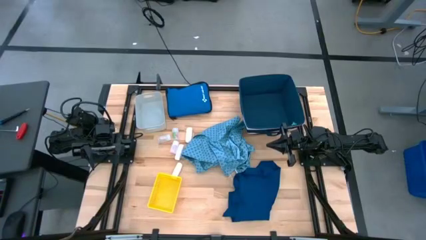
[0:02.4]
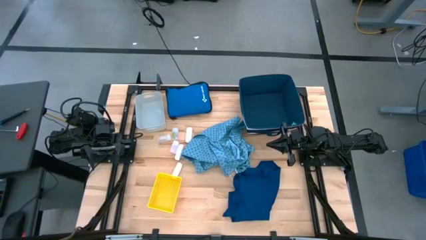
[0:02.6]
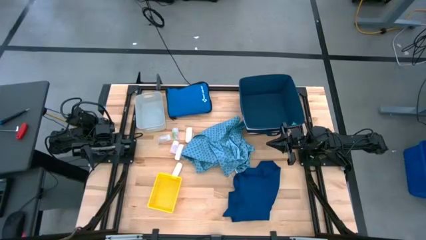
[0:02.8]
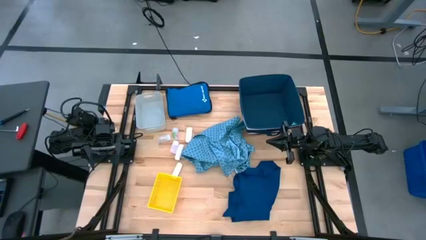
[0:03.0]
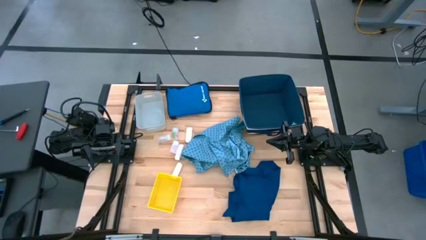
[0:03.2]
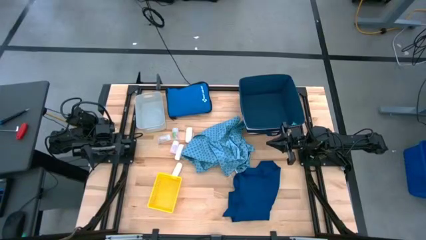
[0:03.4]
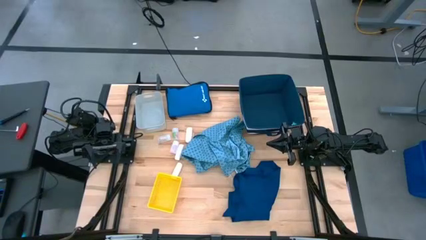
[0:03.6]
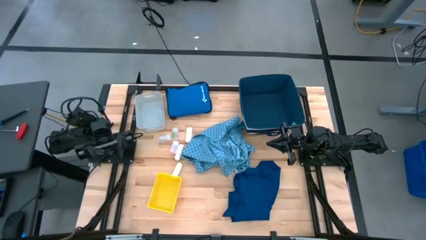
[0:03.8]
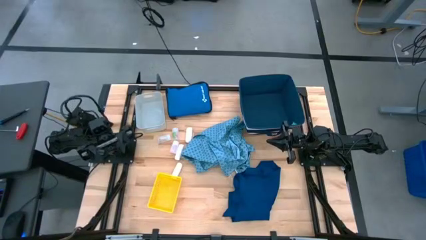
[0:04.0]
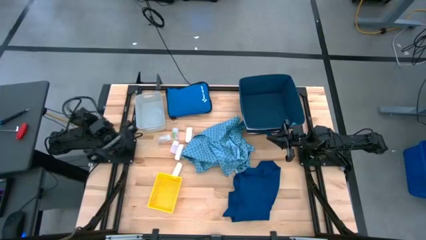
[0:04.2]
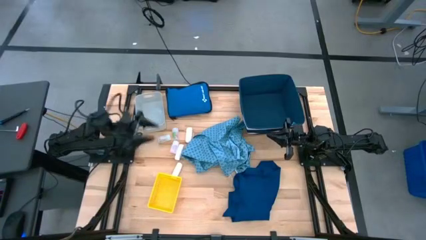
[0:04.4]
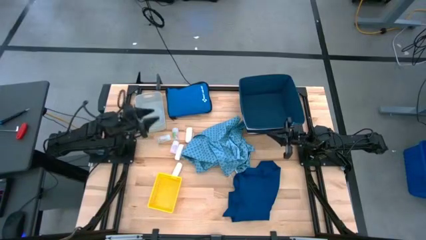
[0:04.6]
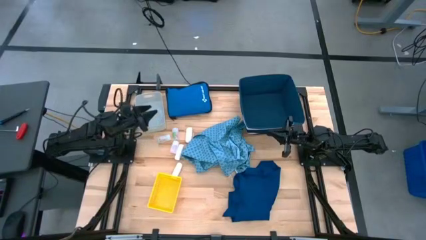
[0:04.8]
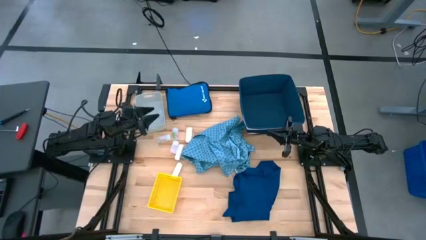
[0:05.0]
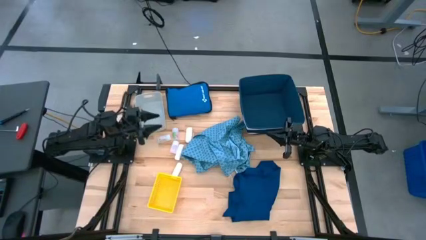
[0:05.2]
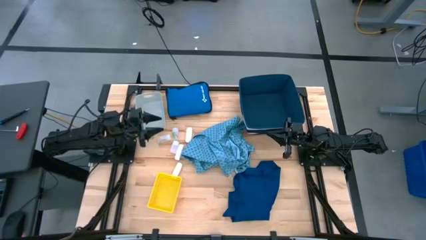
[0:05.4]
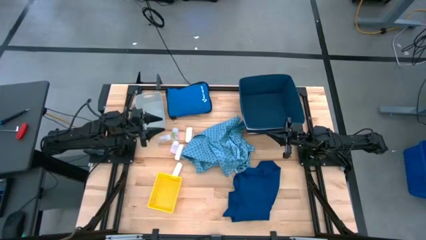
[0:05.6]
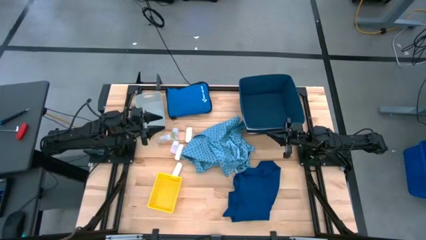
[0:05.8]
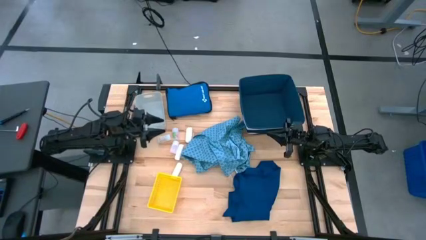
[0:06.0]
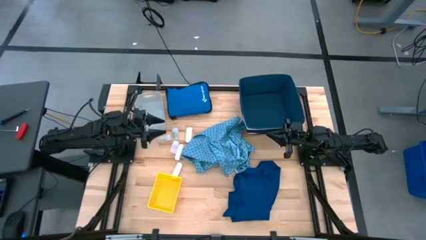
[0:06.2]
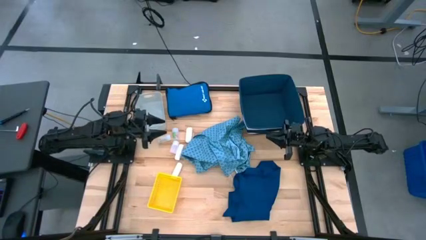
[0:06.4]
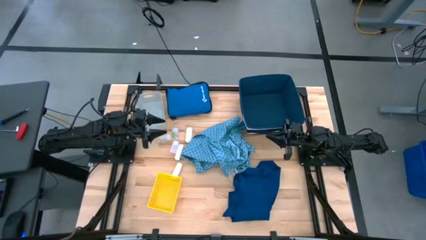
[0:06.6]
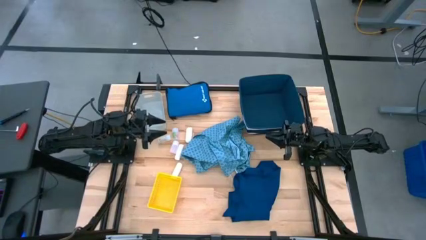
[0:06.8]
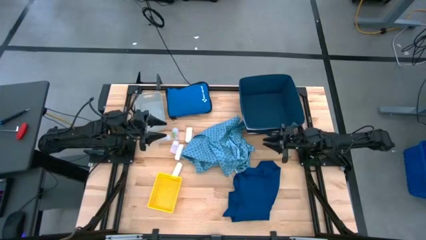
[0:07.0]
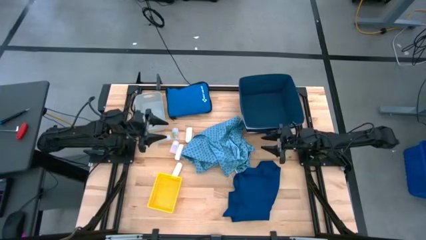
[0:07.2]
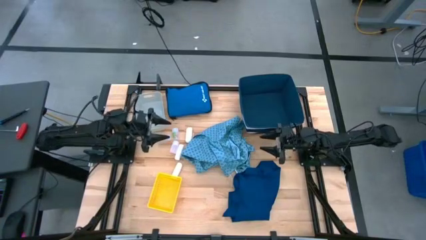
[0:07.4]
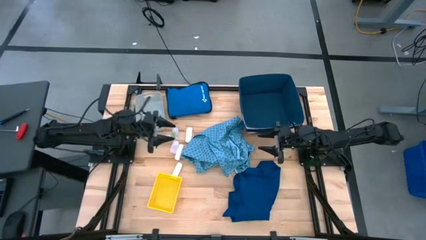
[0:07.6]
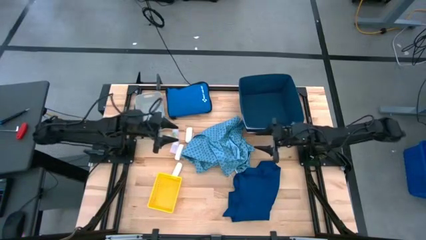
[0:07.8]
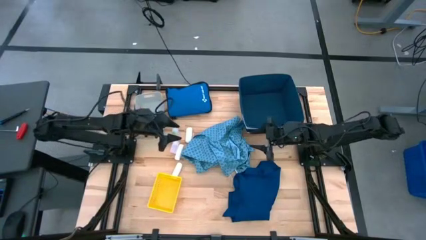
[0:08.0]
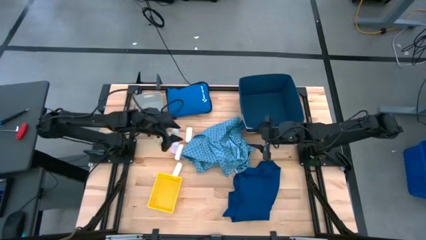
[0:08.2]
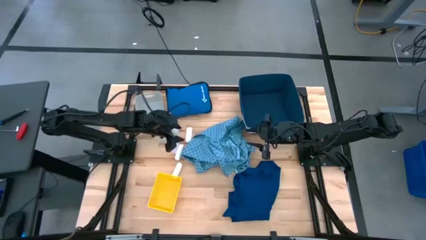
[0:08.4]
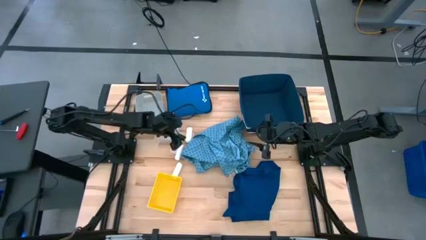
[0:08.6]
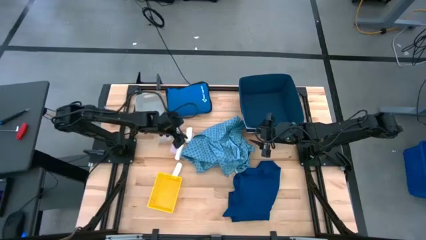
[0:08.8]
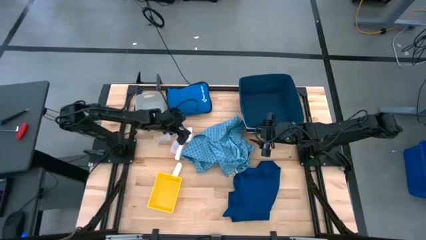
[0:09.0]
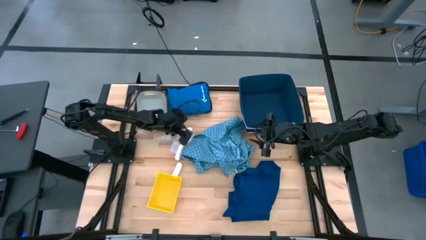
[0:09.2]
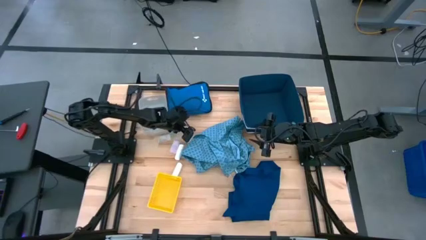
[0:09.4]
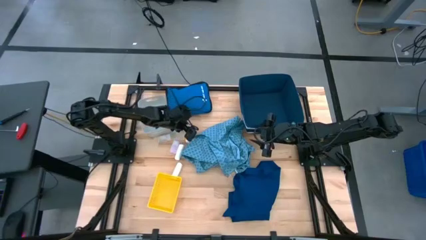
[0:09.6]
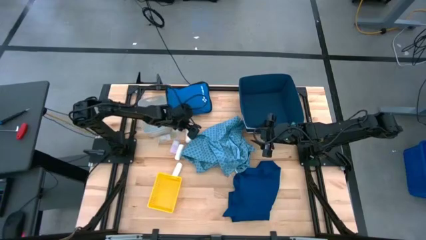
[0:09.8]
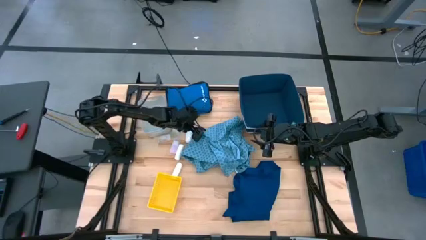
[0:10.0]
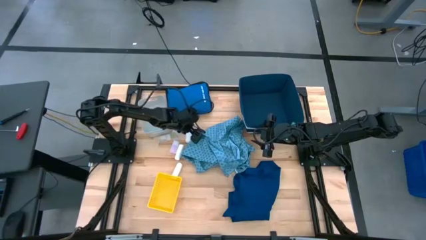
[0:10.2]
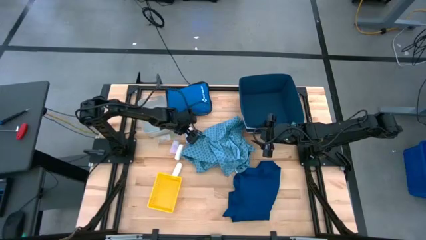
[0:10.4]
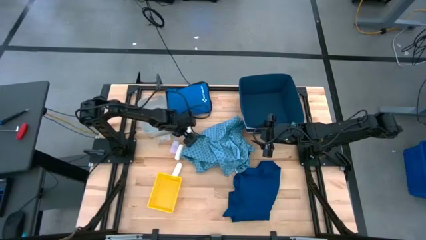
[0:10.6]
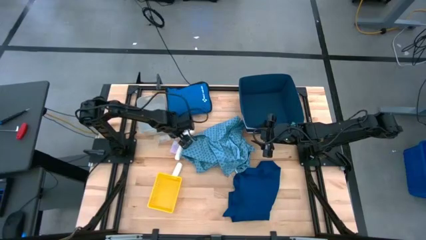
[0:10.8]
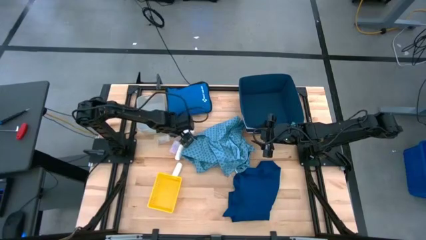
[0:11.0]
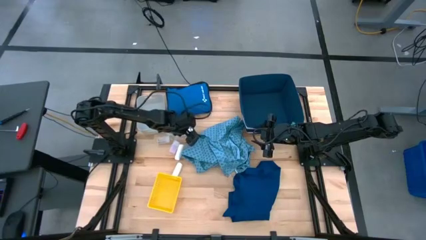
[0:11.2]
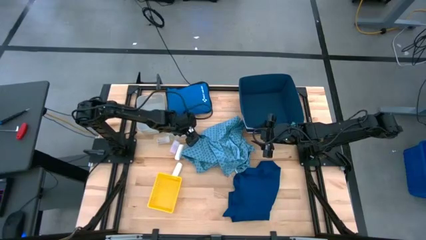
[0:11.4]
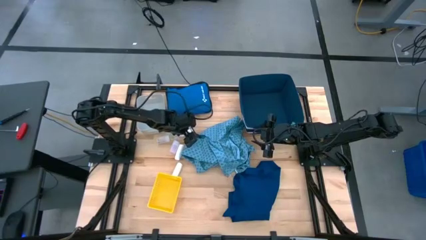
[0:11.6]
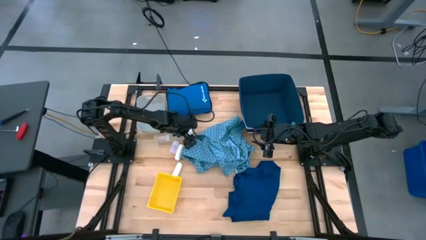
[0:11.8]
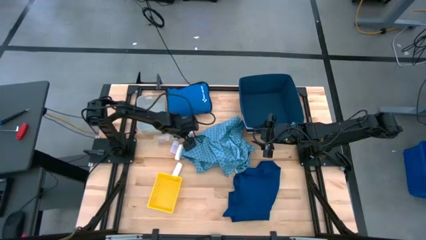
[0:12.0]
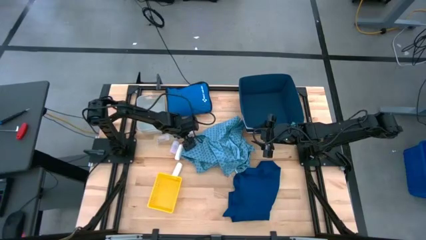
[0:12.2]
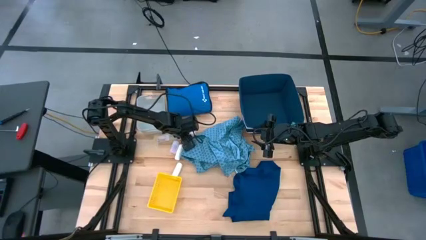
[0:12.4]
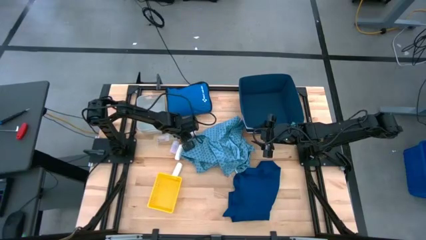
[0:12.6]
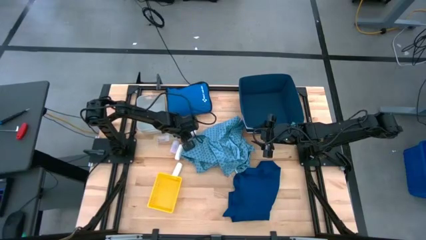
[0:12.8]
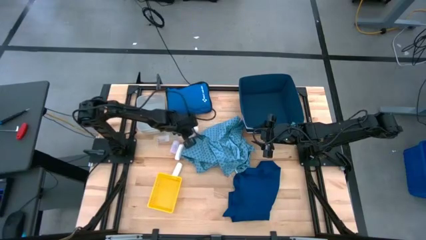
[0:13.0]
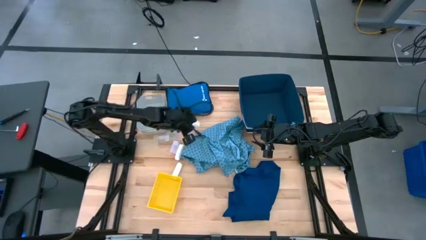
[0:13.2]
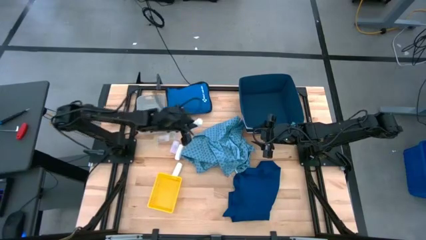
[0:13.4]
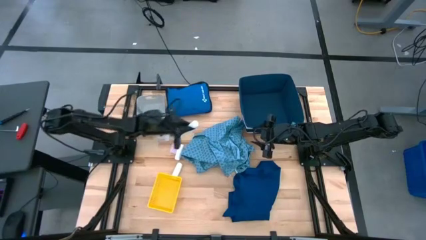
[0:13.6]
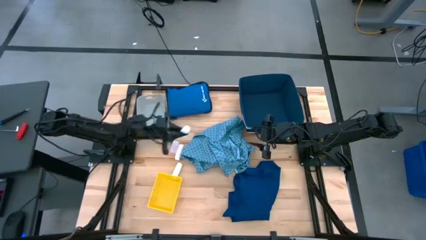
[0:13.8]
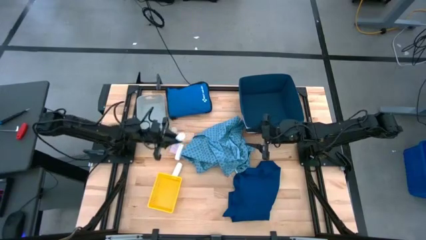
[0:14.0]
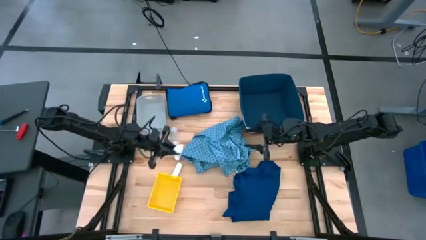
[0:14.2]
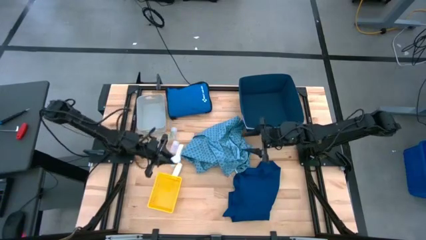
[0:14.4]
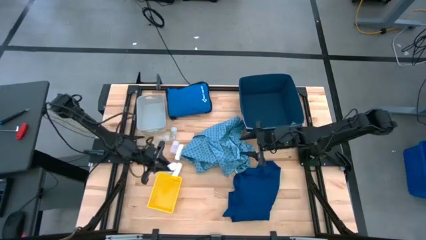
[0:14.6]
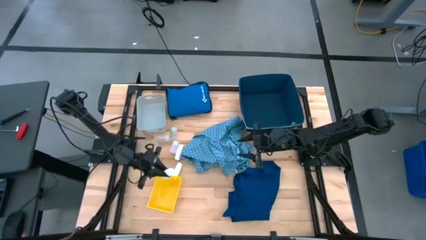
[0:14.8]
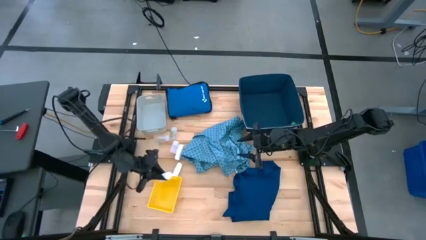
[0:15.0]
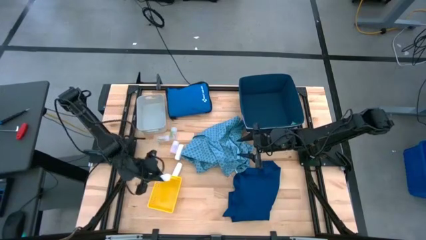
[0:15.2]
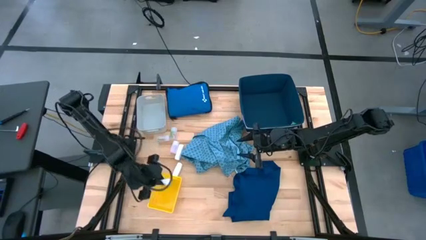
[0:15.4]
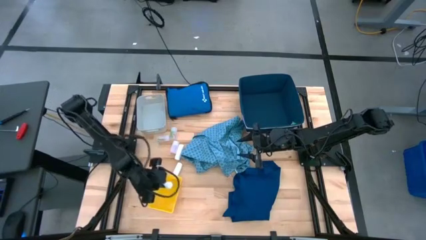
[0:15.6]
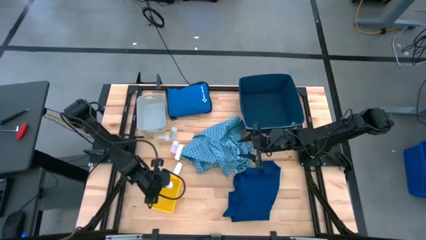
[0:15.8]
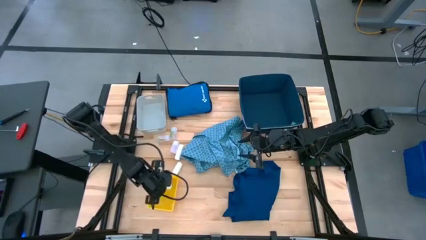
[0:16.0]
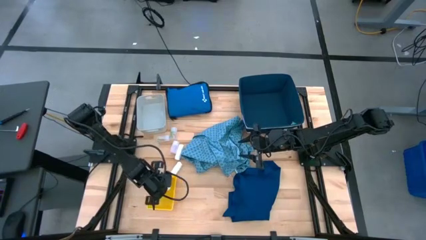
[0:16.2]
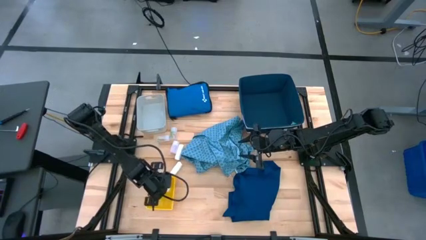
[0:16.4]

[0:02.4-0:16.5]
Task: Pick & place medical supplies in basket/bin
Put the white bandage into the yellow basket

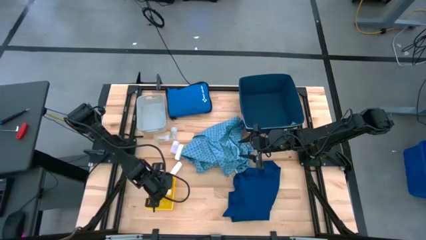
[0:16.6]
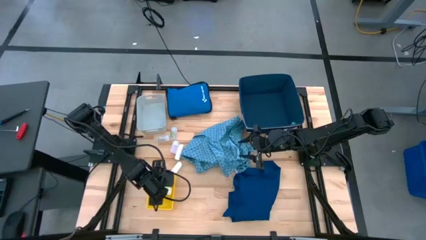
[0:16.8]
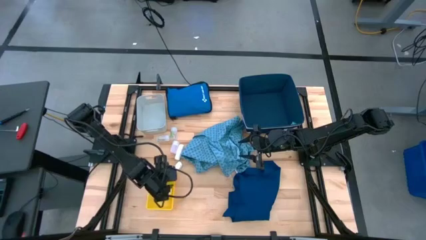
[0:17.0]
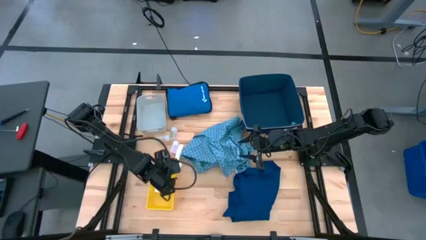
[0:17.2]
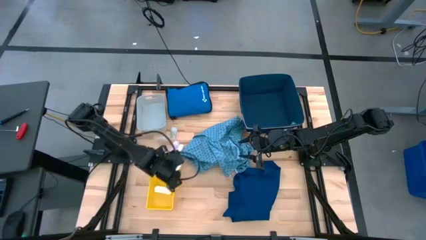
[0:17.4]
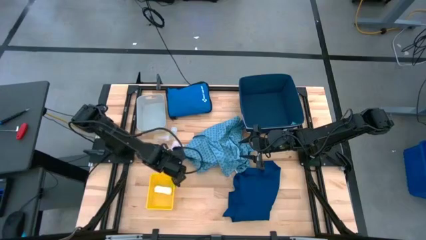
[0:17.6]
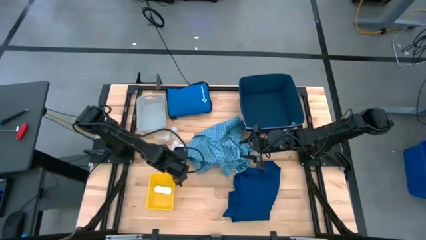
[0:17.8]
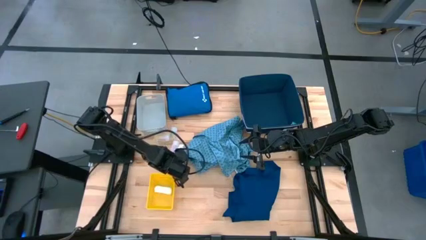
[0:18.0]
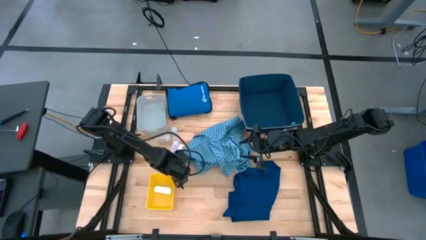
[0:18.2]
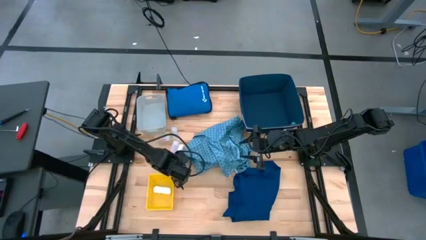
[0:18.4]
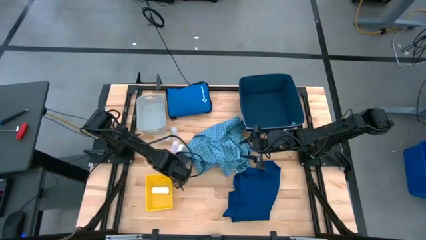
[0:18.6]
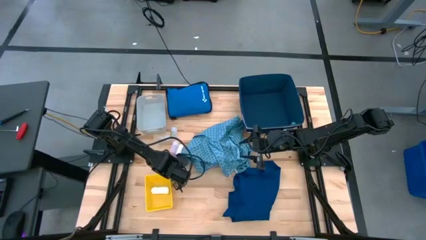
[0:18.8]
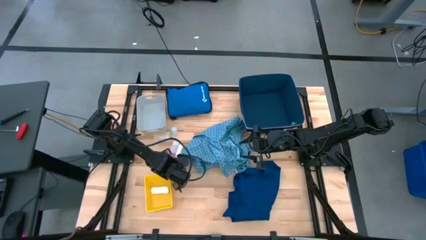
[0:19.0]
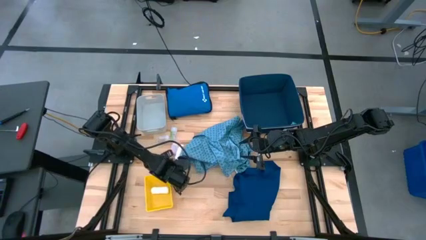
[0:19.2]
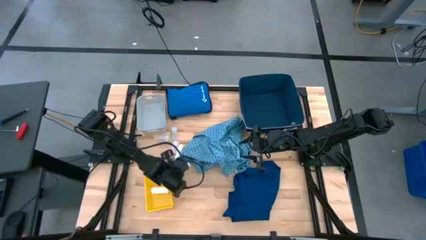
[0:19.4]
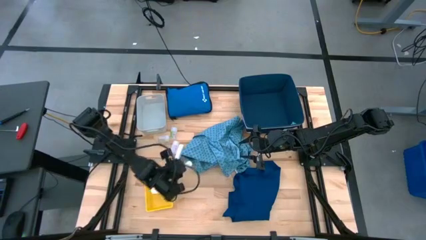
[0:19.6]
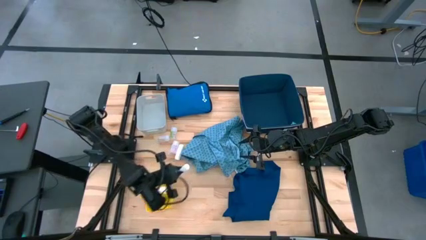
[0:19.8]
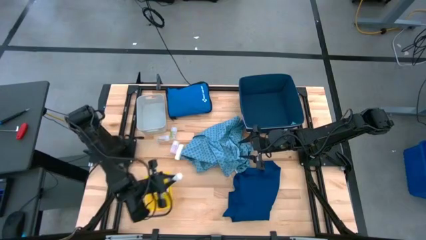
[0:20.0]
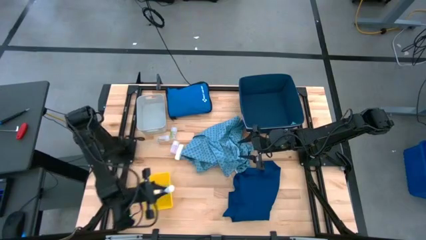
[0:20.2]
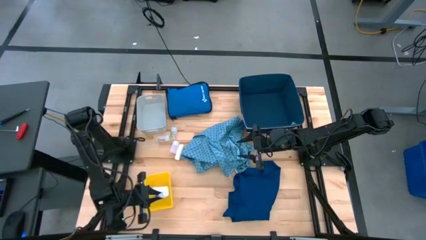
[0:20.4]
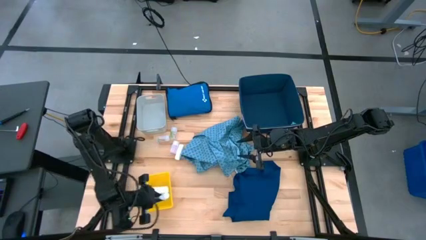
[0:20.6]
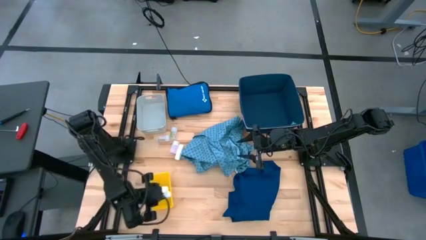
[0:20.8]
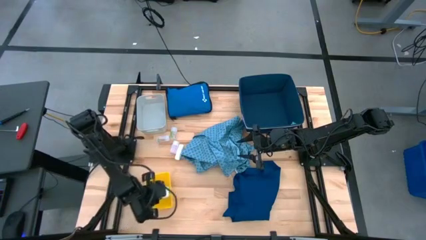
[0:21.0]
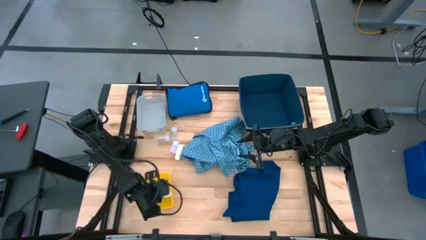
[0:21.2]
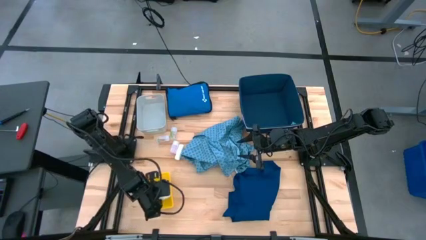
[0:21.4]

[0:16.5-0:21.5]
Put the white bandage into the yellow basket
